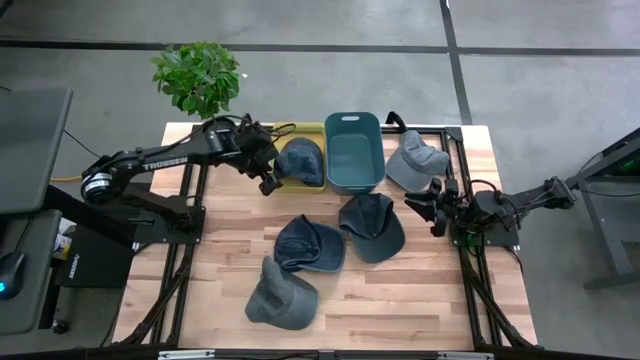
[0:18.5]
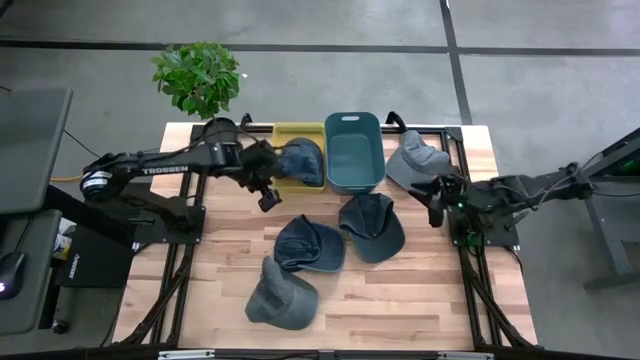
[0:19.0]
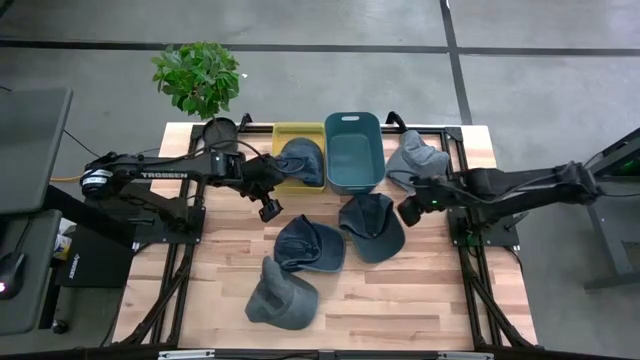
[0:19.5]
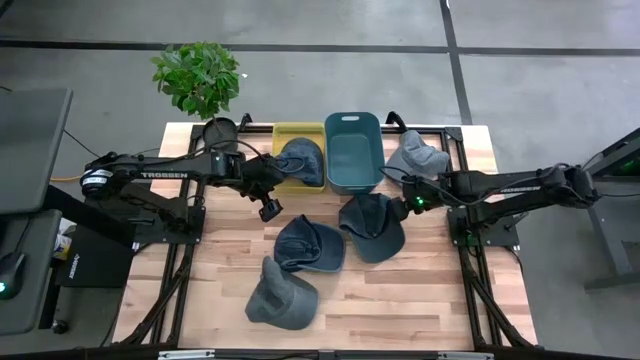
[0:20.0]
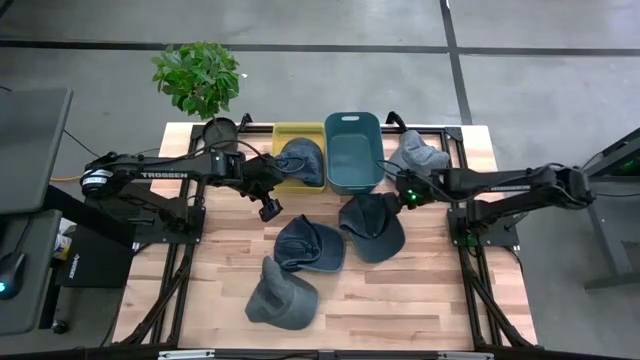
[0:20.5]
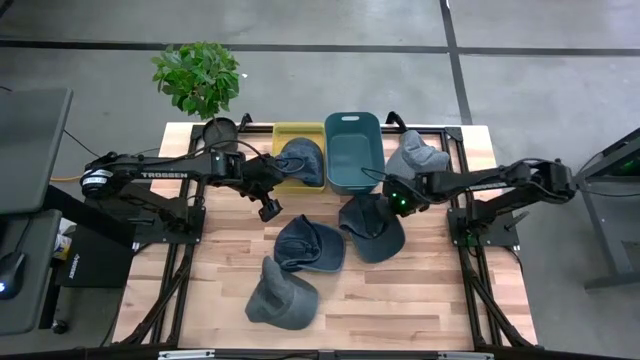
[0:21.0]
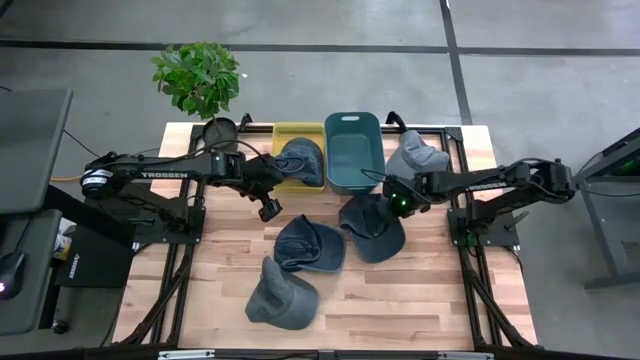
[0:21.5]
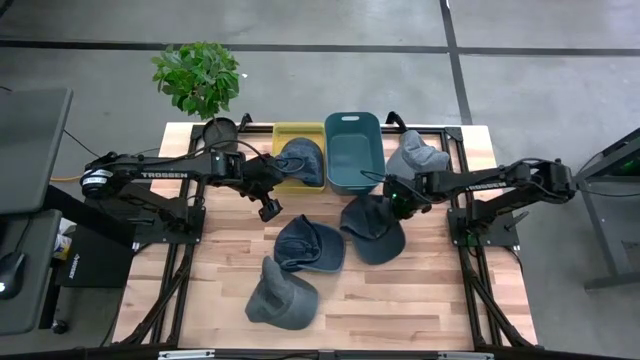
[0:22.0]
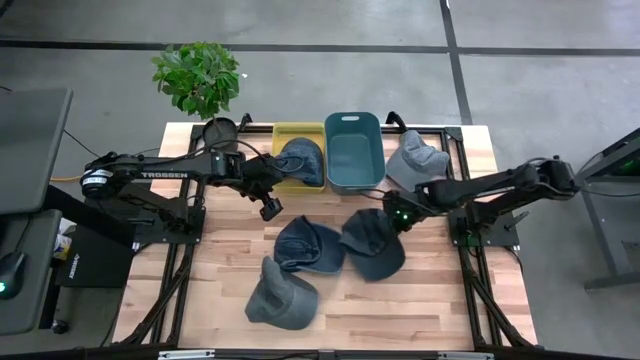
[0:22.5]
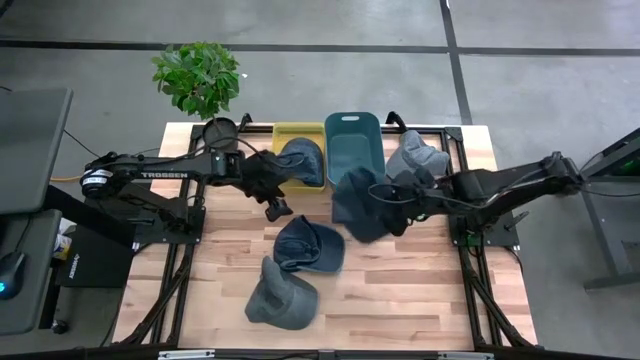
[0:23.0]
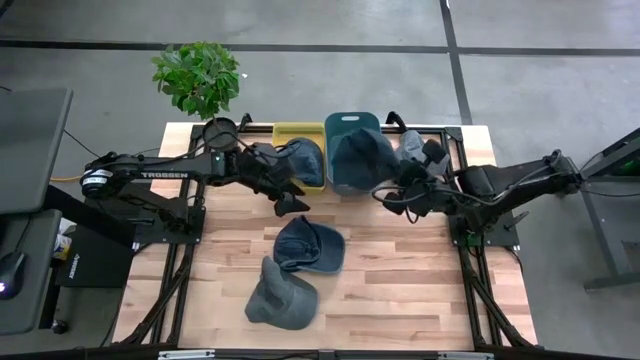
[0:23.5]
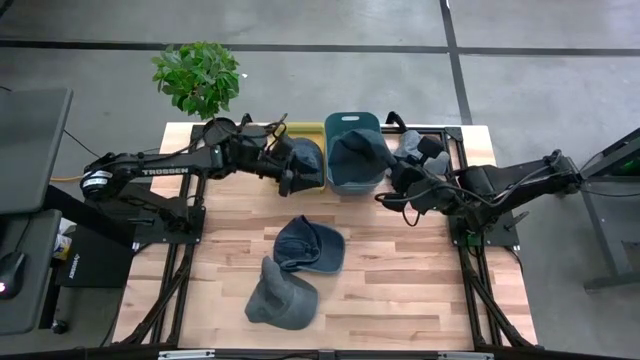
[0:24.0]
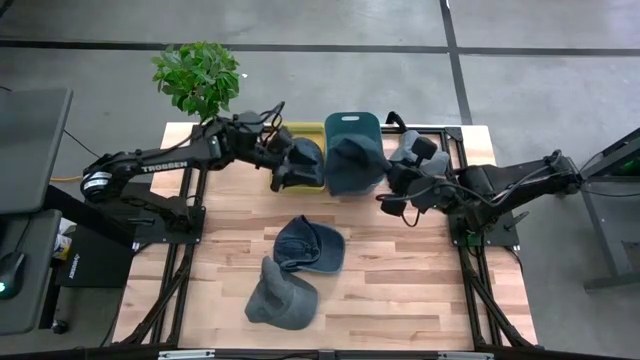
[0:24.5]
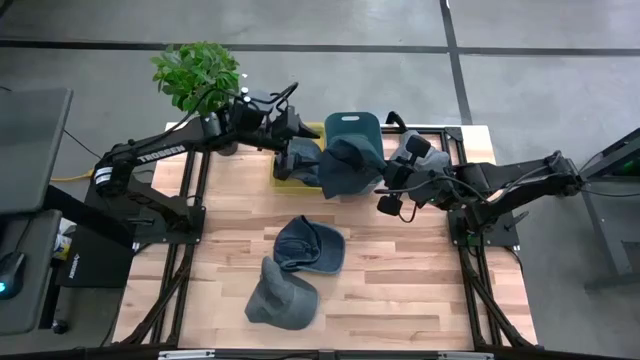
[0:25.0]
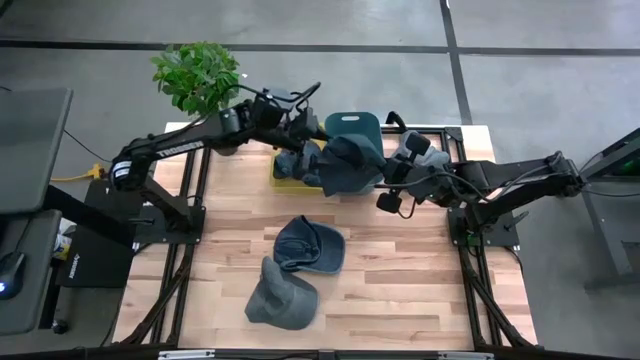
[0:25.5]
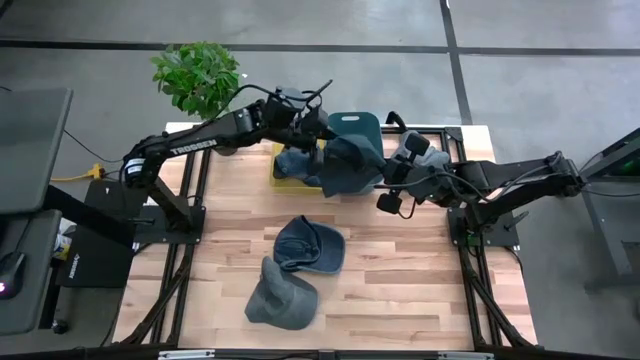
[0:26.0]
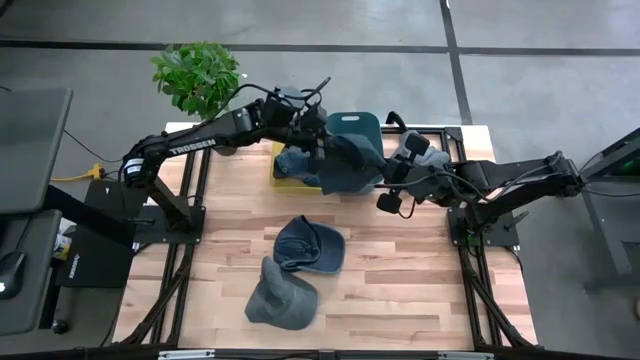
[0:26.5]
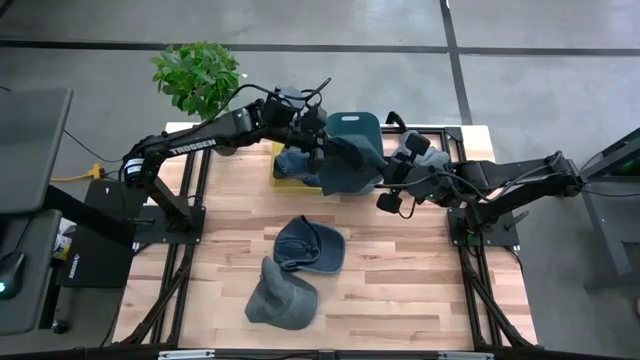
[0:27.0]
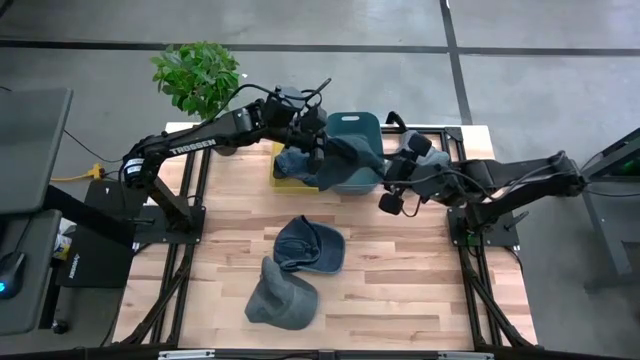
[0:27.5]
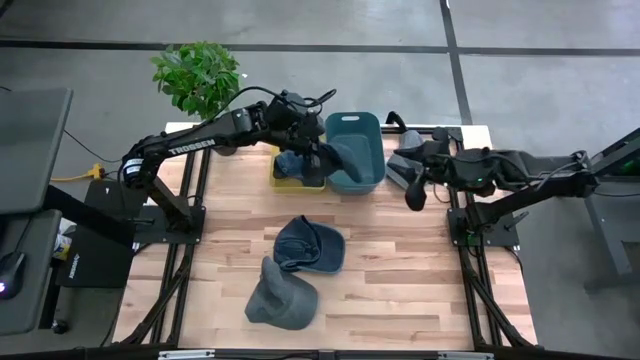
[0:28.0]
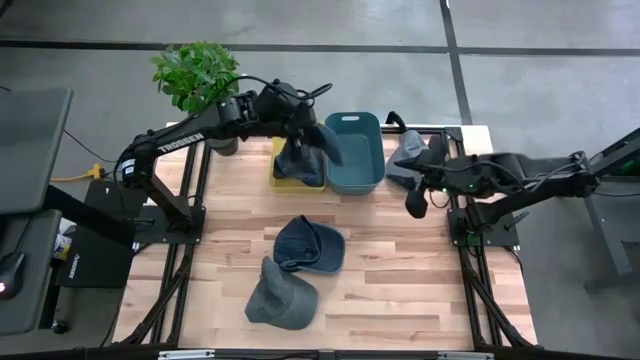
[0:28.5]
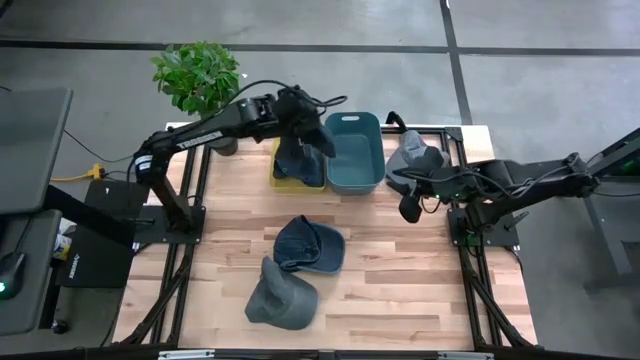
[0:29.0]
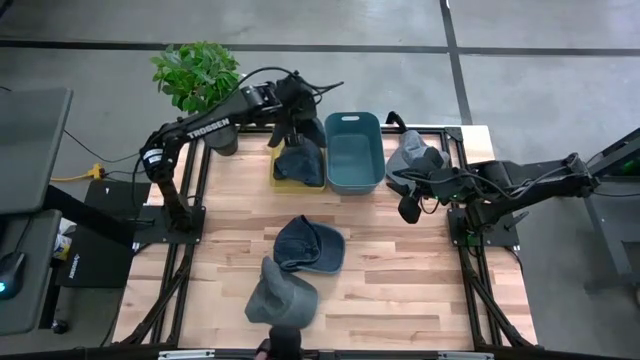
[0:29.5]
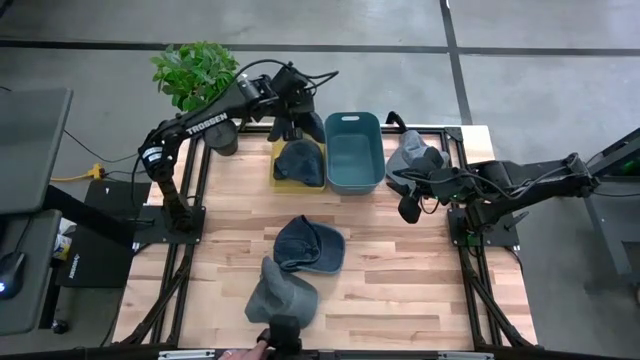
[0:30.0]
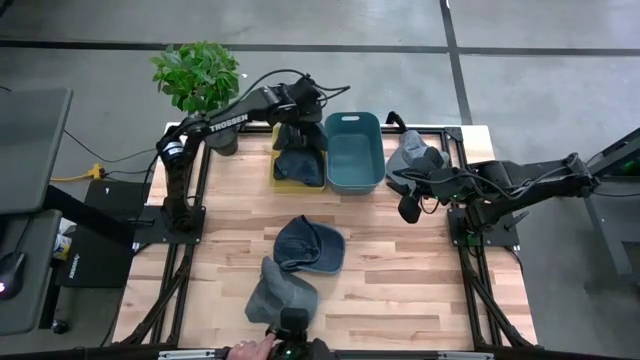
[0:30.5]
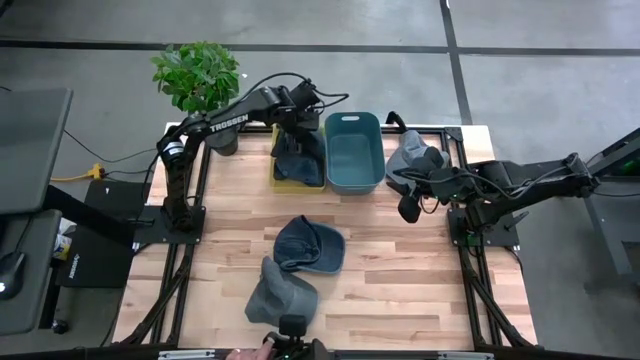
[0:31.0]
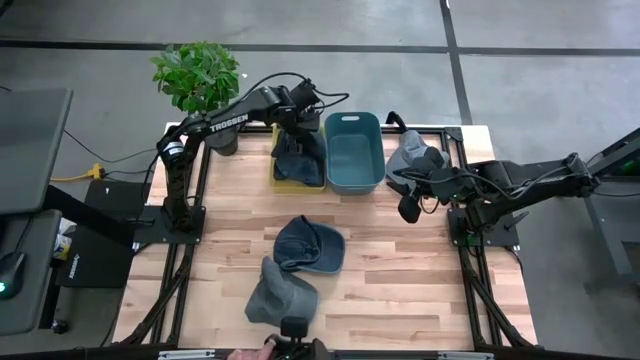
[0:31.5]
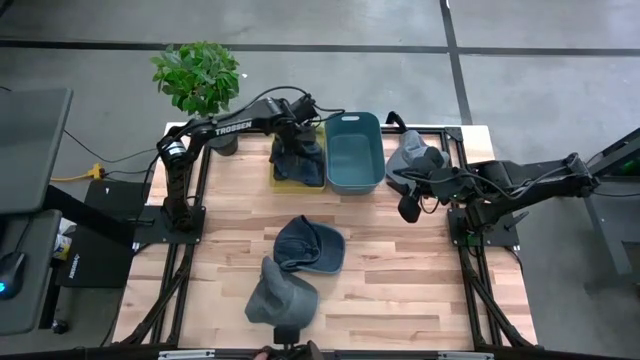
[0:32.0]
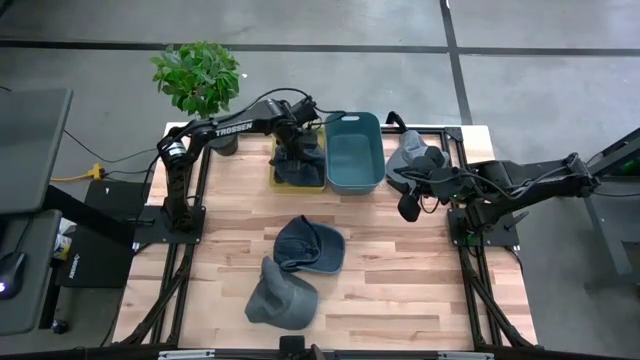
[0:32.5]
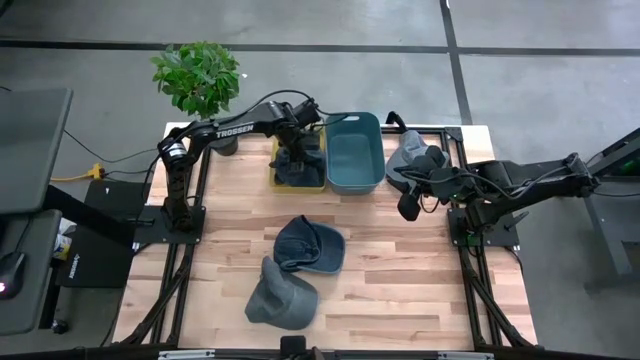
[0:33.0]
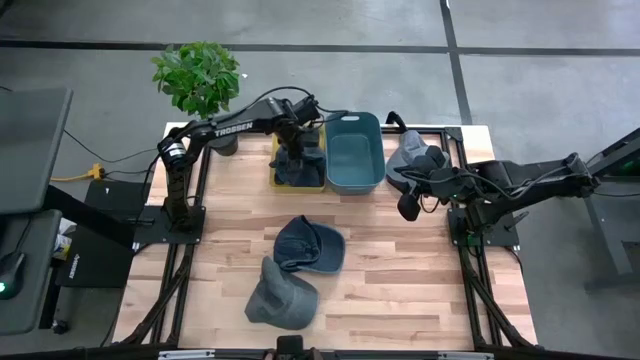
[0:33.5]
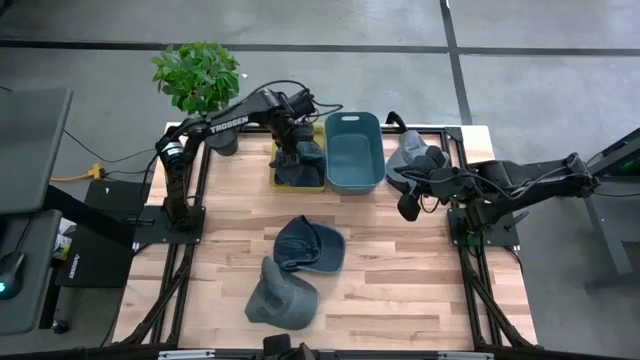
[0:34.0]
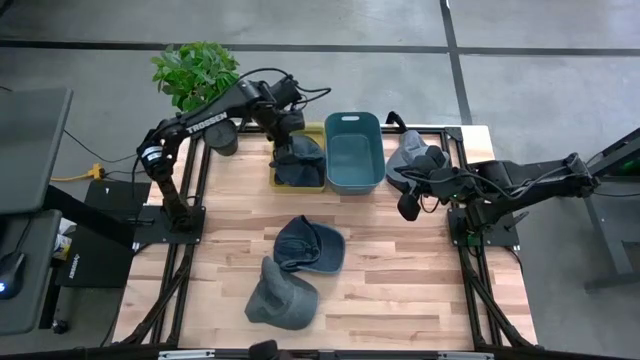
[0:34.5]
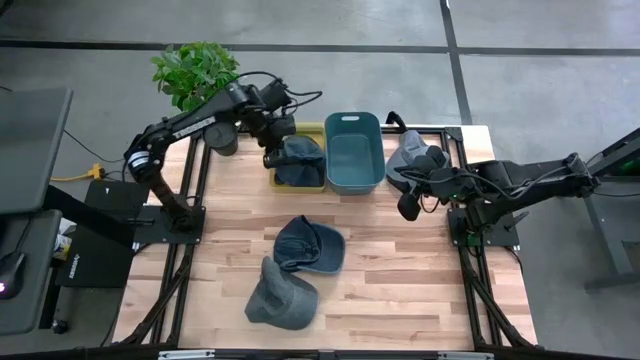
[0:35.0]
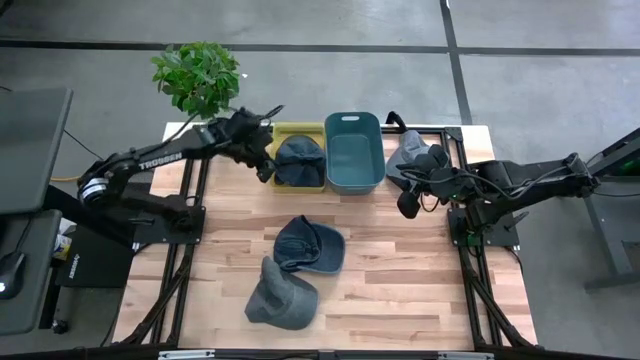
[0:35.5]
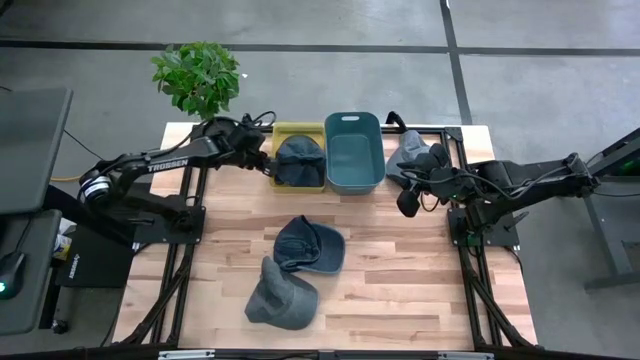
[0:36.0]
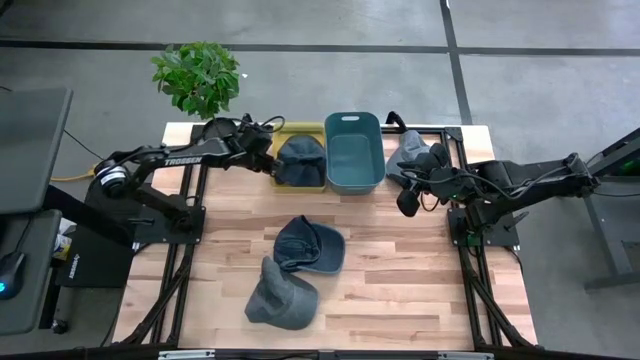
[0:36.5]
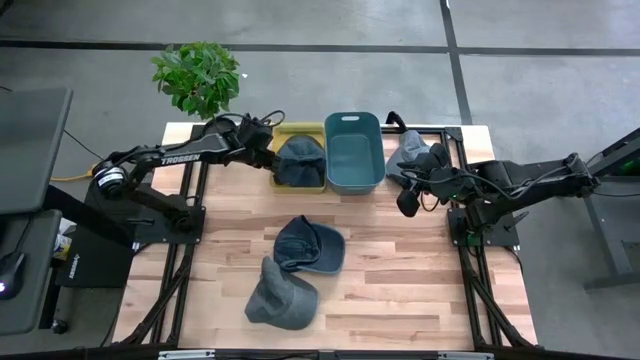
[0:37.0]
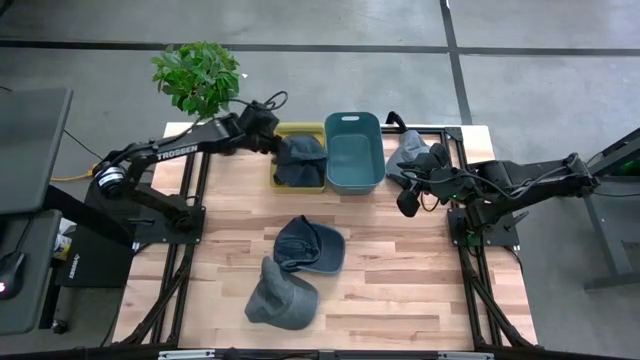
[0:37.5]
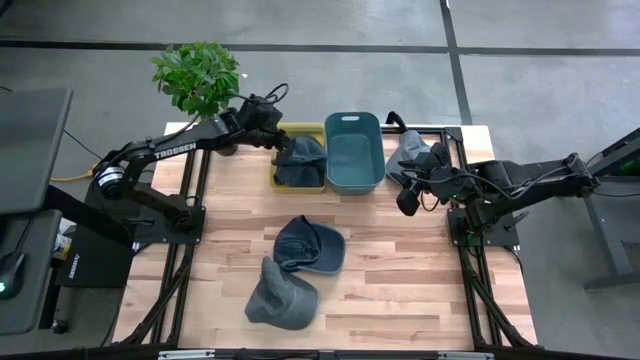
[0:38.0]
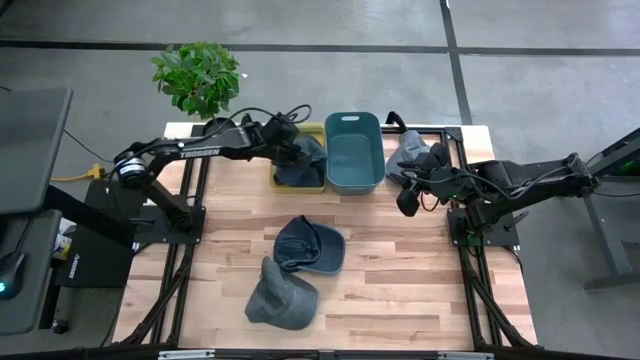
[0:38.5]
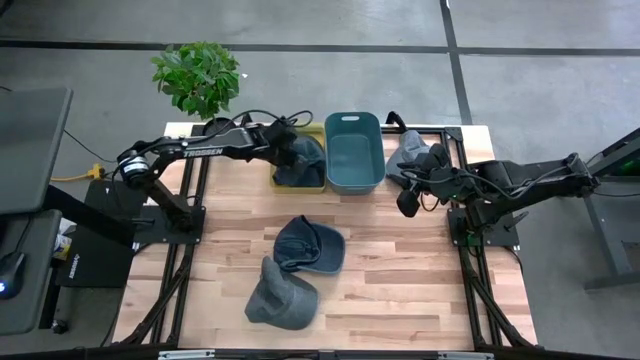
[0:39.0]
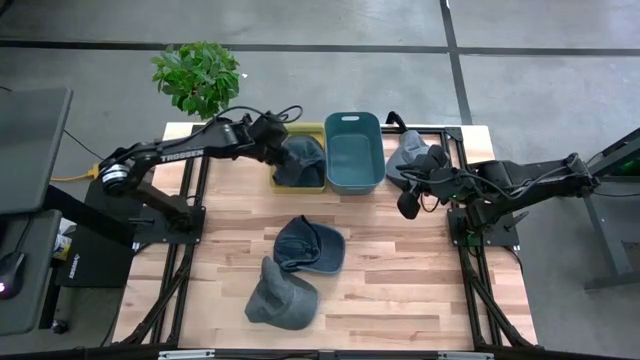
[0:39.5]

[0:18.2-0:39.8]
Task: Pick & Place hat
Put the right dark blue cap into the yellow bin
